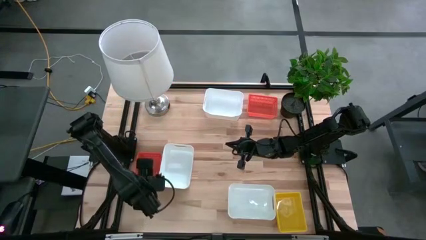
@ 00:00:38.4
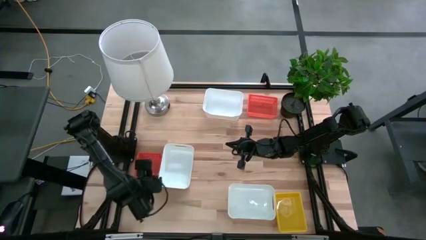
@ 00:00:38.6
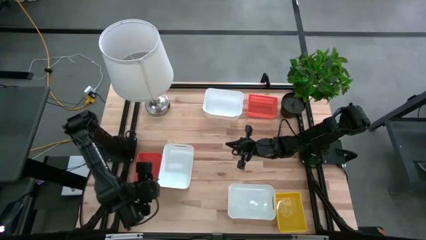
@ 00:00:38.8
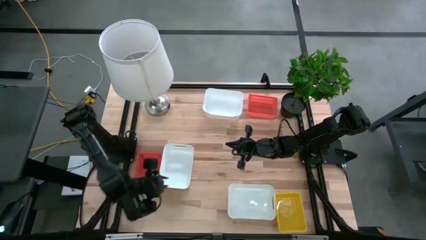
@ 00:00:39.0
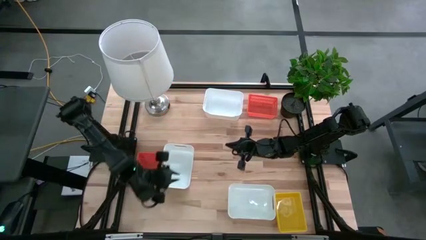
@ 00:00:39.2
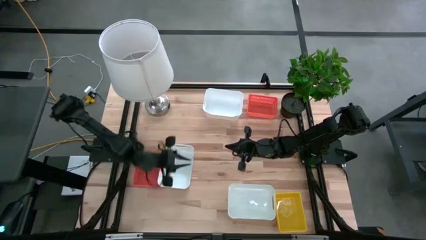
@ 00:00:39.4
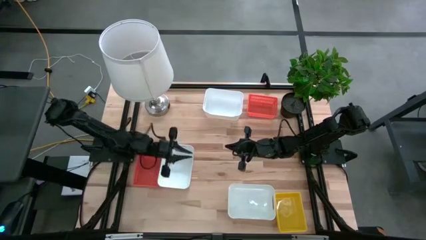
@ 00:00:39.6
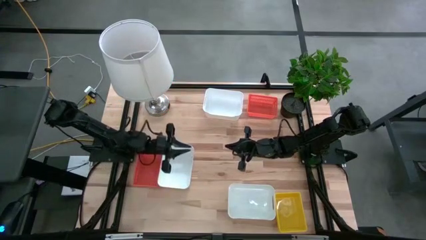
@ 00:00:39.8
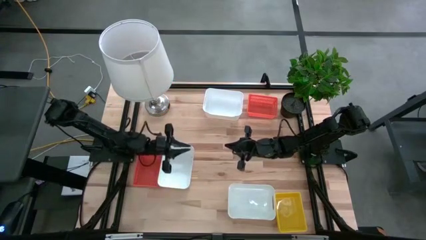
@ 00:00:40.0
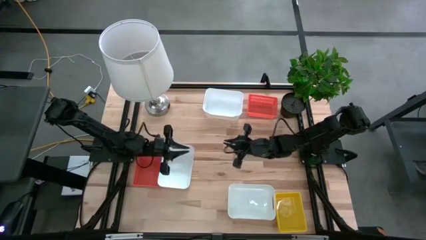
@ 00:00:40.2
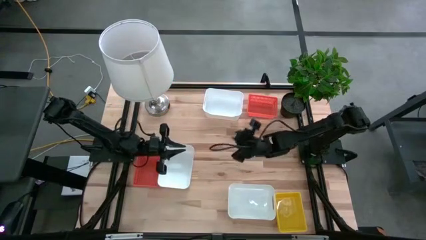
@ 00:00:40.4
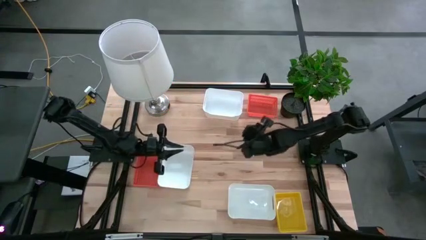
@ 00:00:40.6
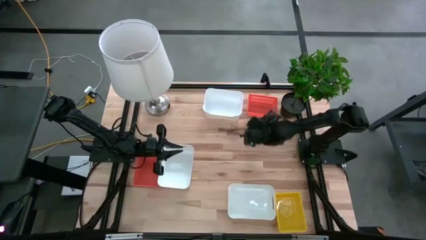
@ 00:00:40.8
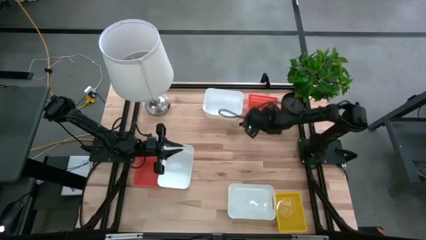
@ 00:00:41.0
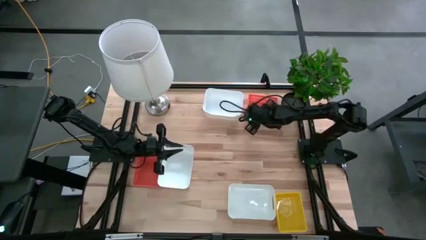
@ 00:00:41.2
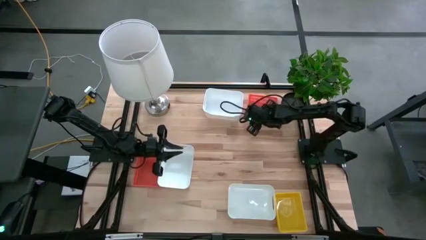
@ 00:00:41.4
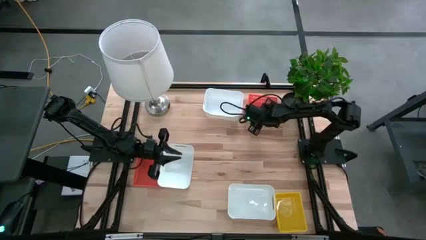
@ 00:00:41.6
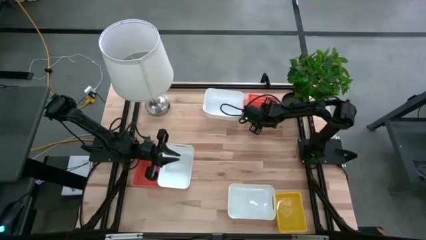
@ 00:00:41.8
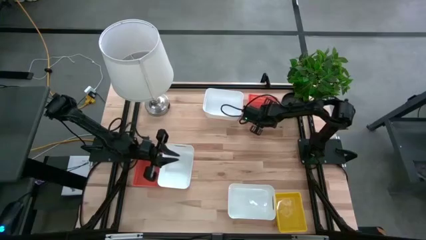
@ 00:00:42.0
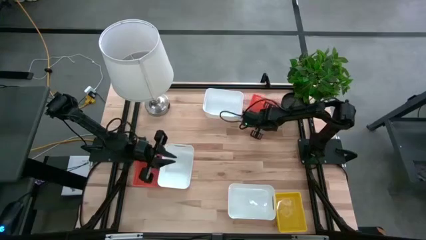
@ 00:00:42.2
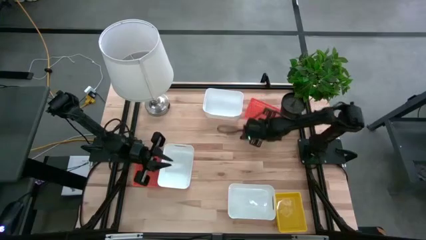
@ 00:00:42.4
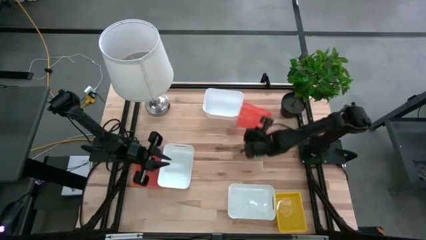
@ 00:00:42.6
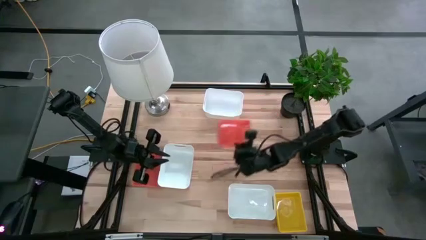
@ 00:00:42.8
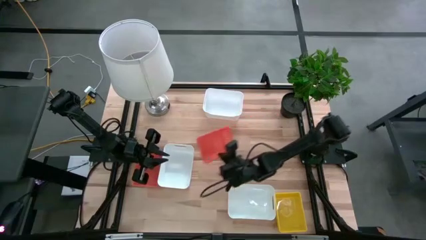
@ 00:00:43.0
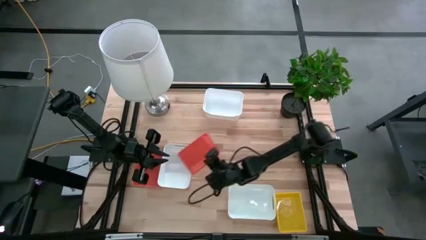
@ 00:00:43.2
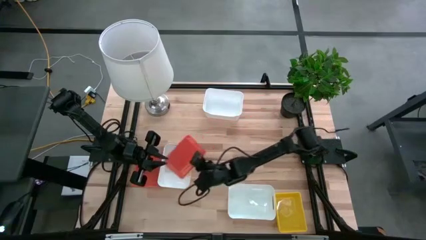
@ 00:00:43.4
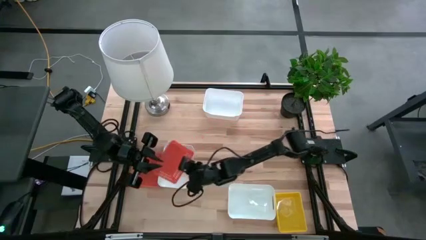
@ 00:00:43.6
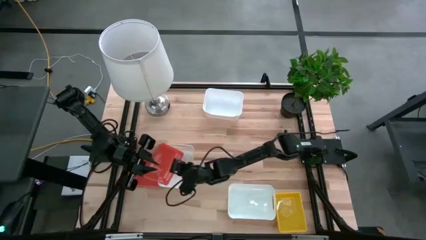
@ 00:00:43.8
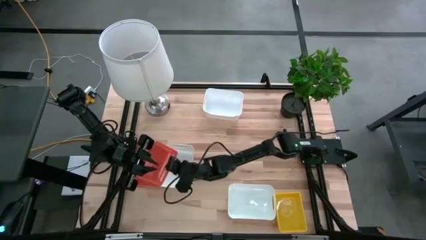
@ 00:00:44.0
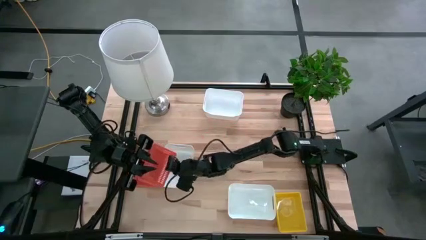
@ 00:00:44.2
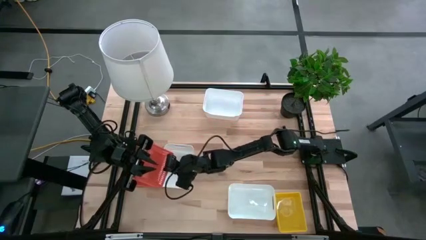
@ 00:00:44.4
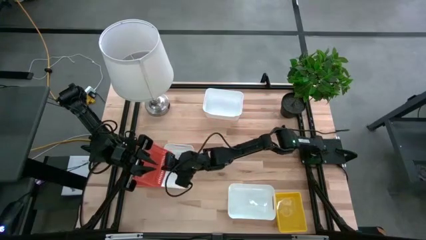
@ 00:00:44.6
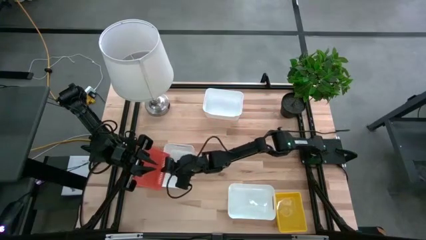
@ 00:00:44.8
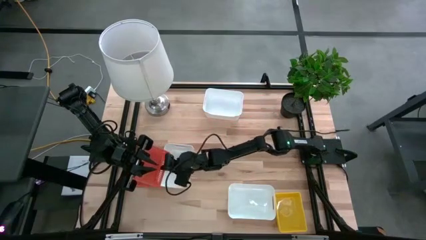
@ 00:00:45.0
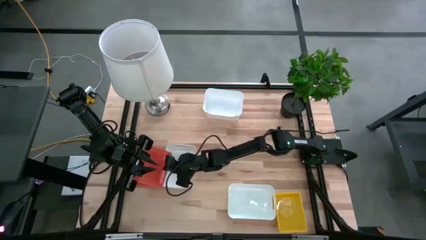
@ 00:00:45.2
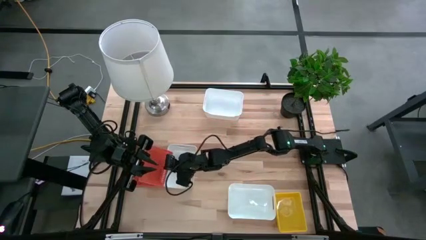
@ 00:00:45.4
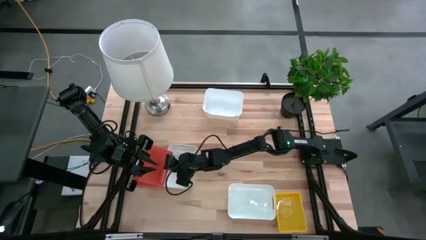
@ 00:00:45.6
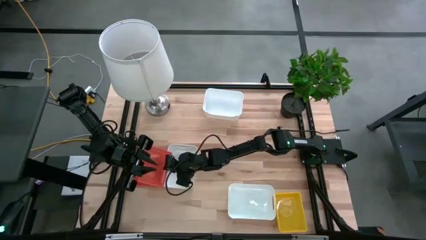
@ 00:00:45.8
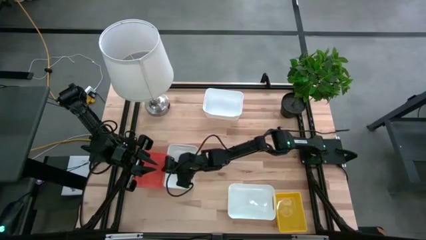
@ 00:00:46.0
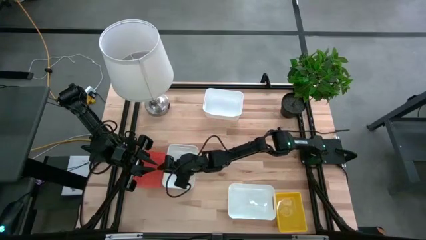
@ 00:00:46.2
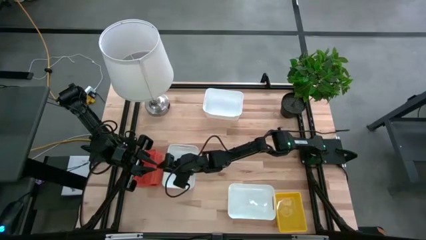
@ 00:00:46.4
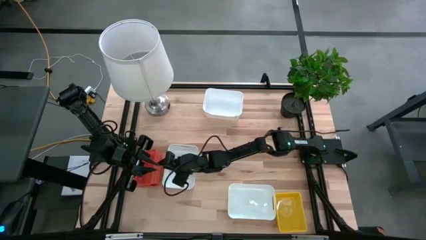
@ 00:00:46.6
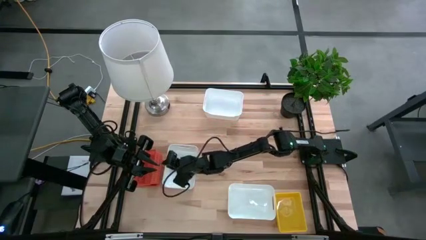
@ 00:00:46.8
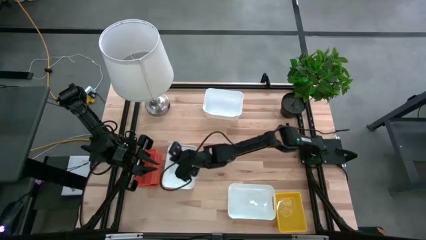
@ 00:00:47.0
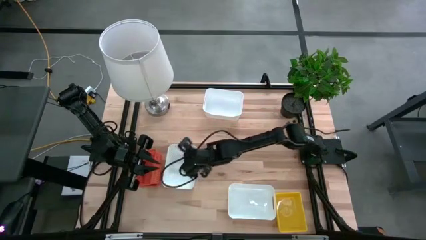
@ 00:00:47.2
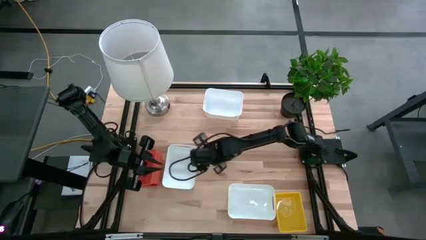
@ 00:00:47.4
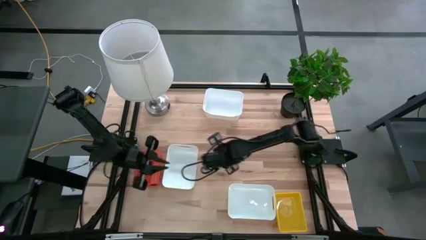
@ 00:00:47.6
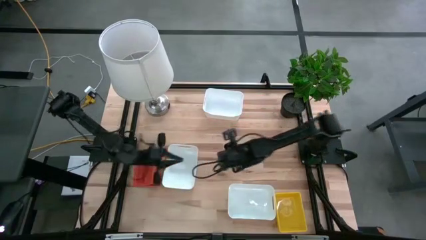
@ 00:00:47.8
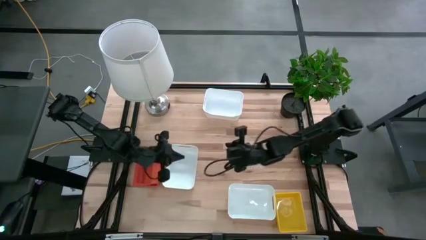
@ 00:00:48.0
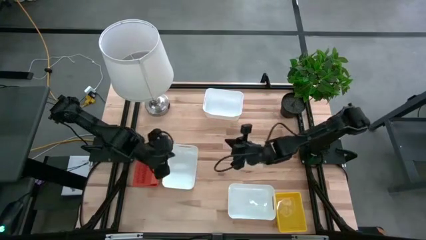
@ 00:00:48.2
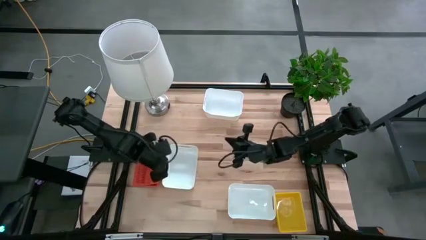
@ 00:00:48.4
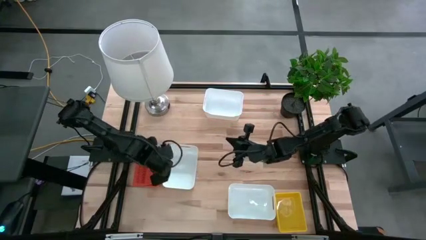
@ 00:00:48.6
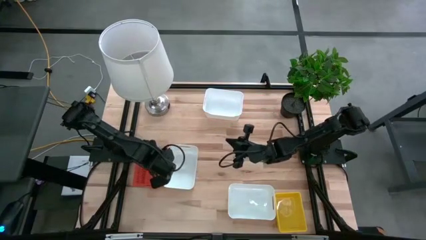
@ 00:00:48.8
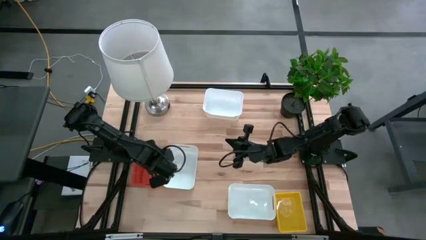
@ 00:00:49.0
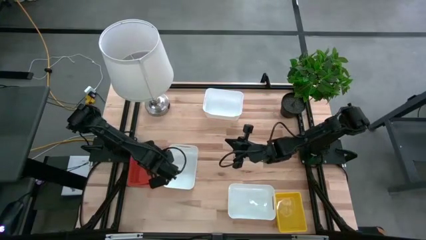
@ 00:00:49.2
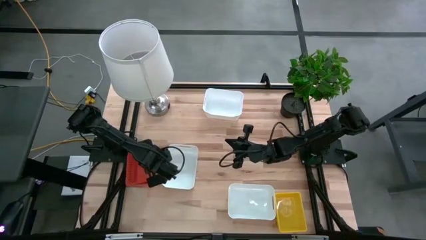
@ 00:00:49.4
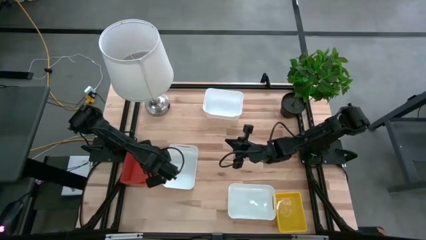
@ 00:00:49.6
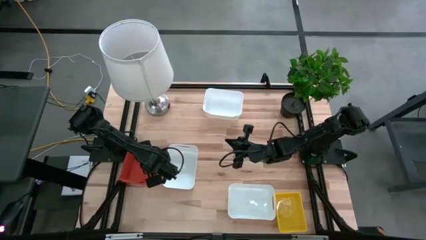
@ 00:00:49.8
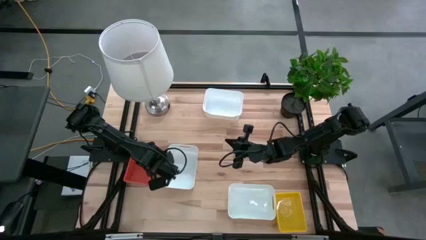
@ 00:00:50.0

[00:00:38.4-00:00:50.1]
Stack the top orange bin on the bottom stacked orange bins

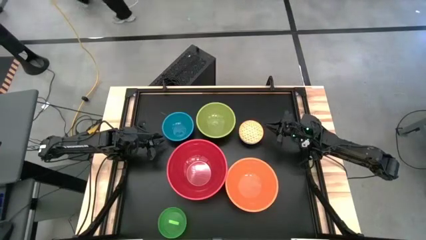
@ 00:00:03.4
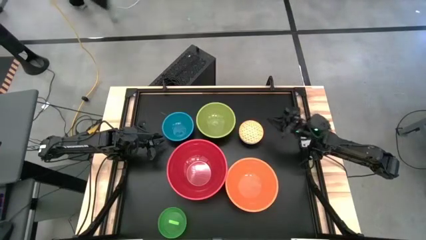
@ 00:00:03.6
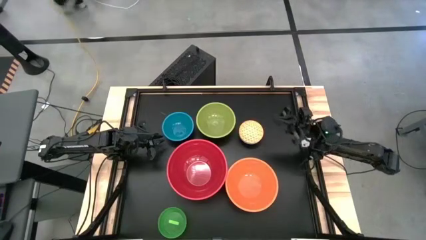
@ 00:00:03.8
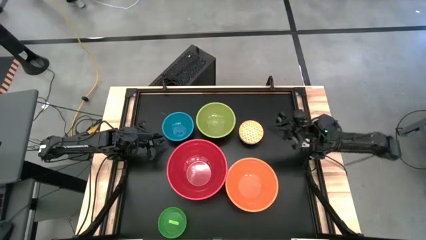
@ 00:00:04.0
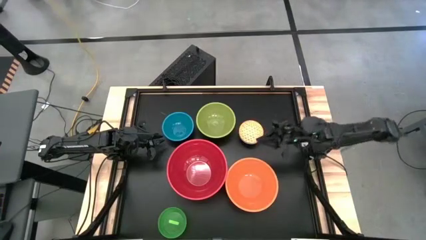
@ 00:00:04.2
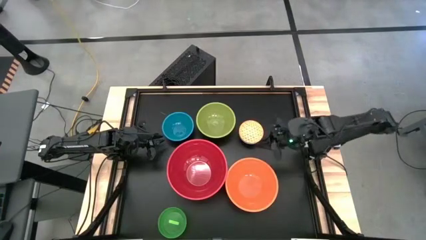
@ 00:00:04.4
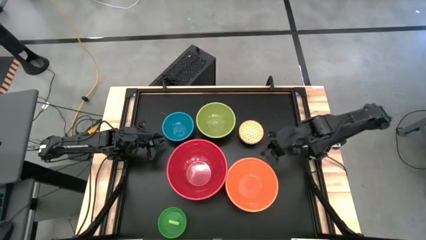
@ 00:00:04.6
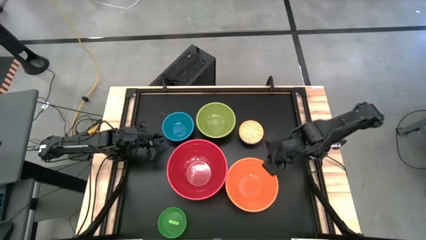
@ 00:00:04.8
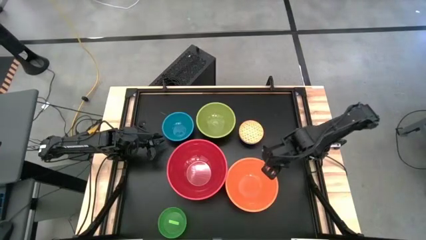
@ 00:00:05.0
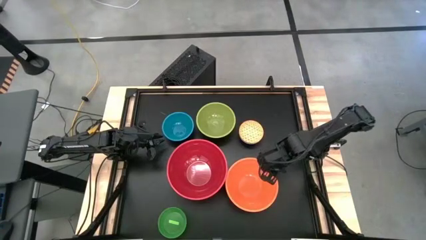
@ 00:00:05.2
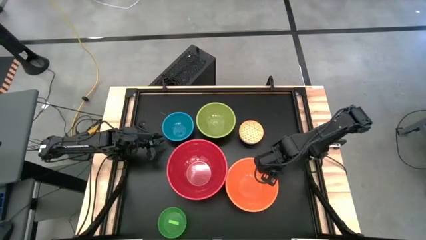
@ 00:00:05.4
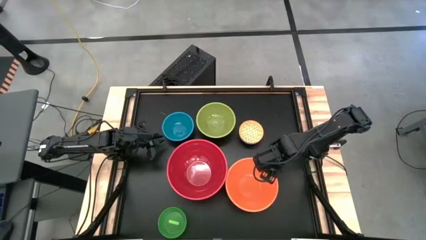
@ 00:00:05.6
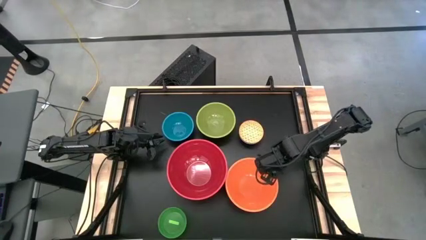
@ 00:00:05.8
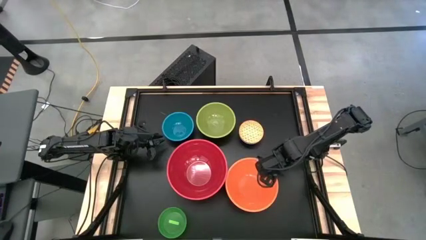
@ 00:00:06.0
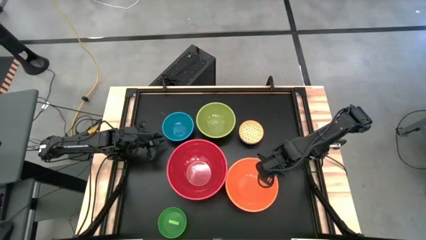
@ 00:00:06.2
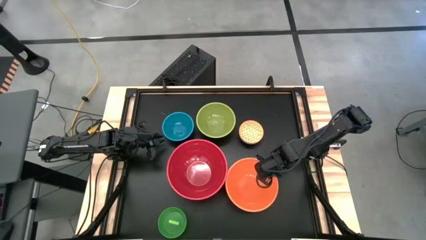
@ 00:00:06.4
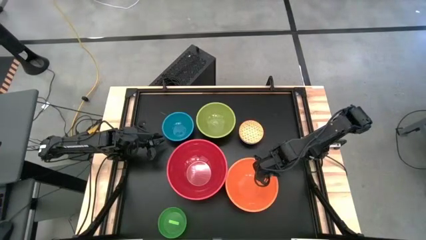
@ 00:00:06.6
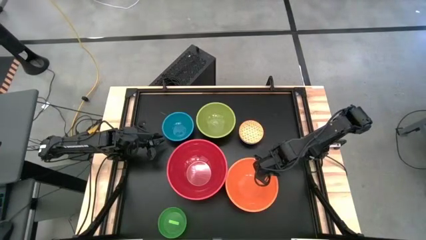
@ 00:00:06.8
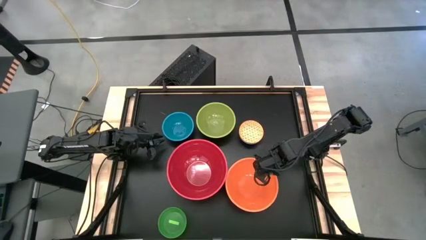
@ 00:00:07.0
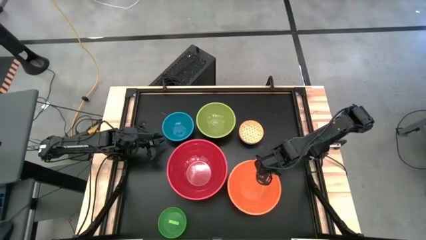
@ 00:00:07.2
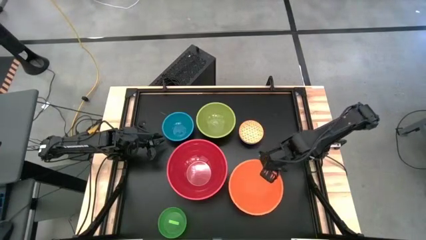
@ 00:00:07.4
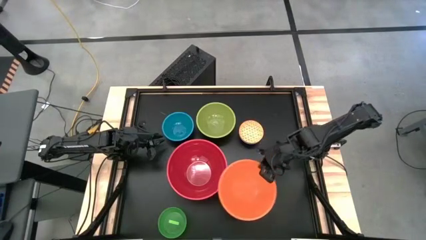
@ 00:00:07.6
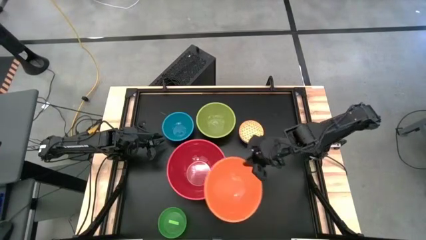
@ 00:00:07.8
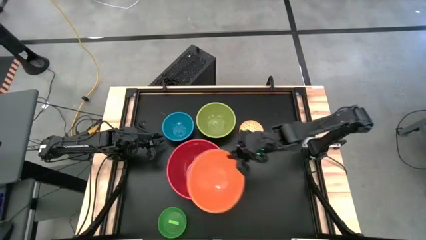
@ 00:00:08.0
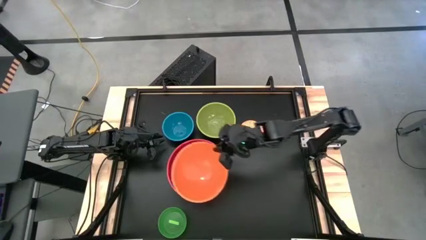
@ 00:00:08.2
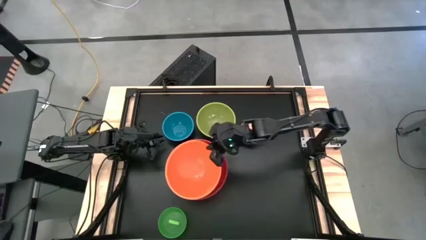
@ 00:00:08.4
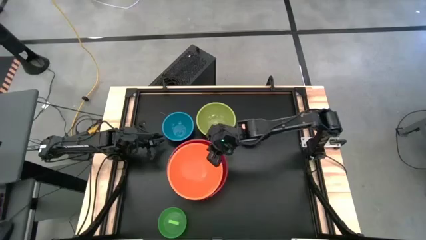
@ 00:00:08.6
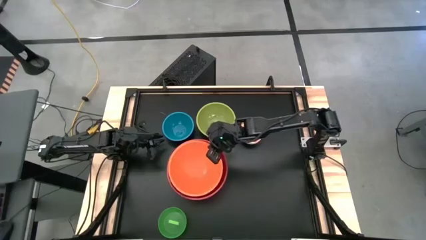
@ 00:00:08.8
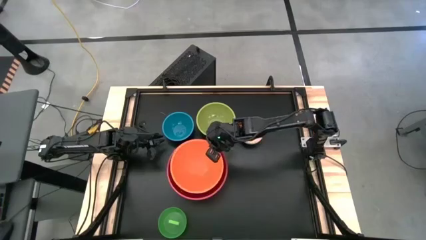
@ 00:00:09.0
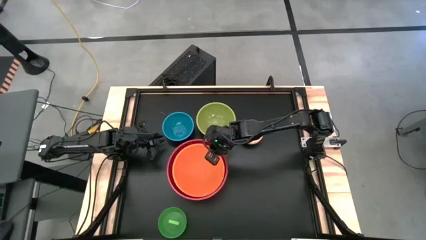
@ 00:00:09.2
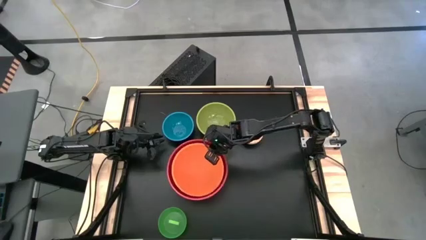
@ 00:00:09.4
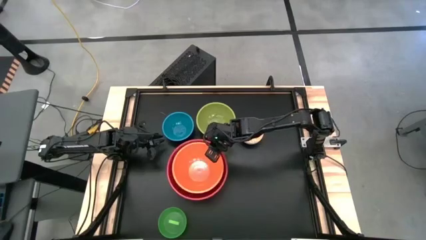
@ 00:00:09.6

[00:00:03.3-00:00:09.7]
Stack the orange bowl on top of the red bowl
